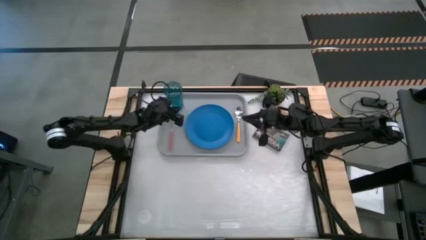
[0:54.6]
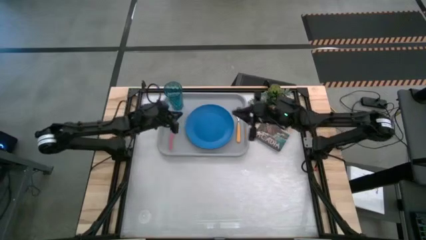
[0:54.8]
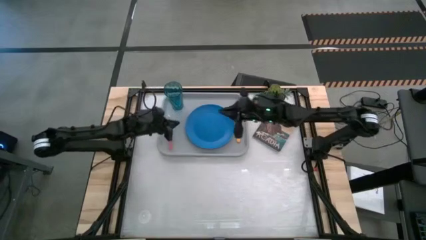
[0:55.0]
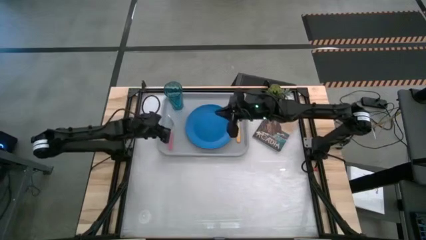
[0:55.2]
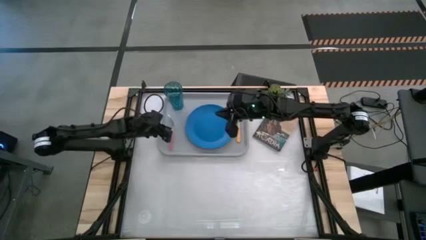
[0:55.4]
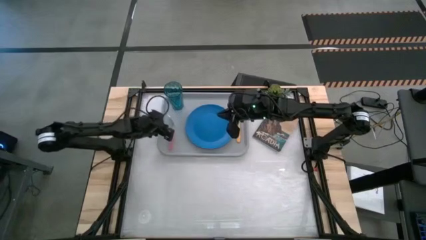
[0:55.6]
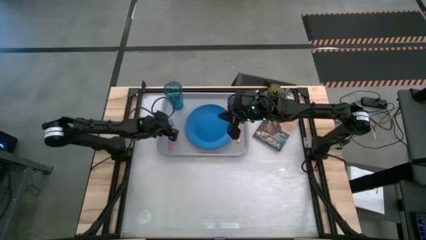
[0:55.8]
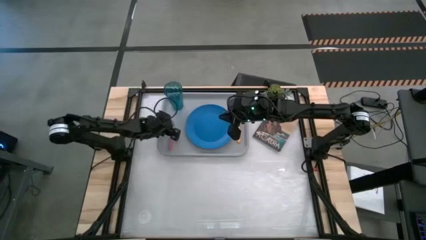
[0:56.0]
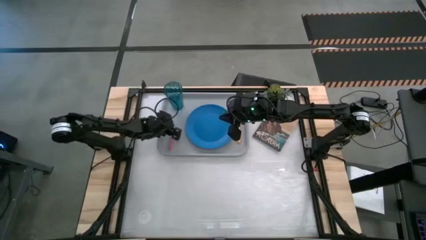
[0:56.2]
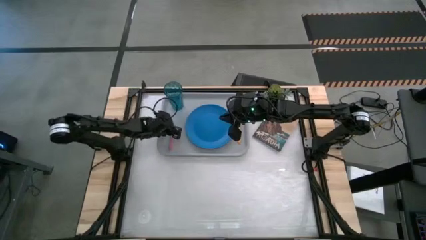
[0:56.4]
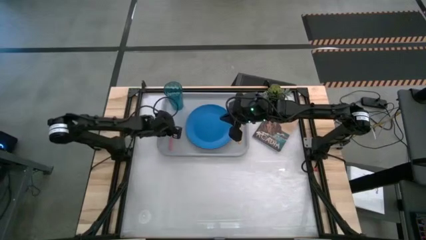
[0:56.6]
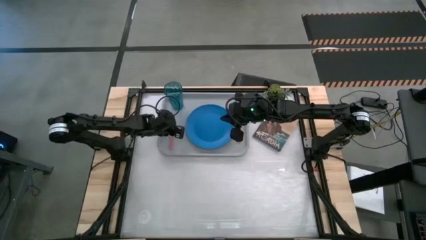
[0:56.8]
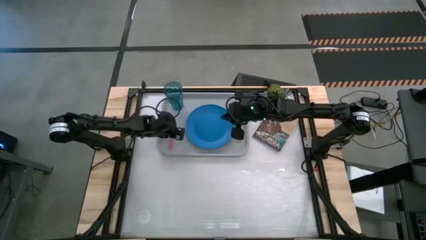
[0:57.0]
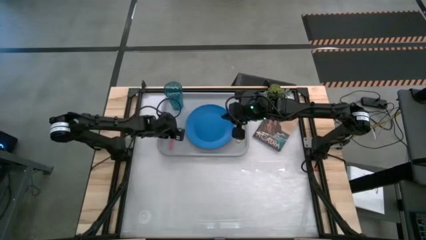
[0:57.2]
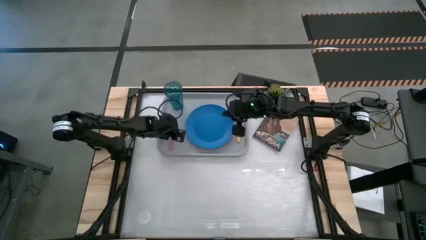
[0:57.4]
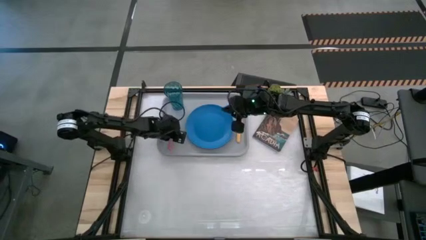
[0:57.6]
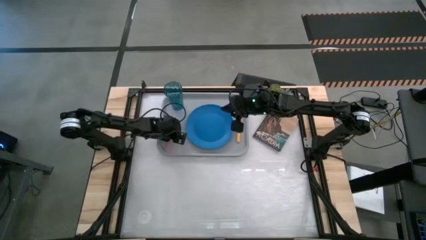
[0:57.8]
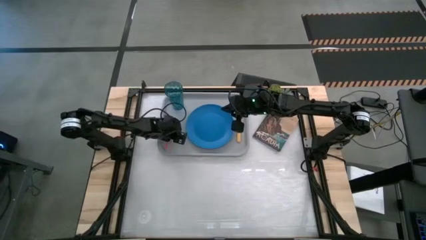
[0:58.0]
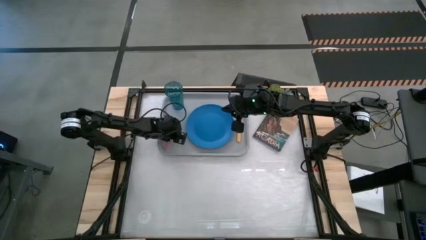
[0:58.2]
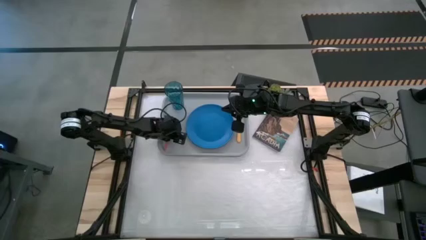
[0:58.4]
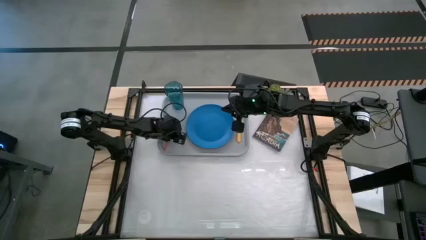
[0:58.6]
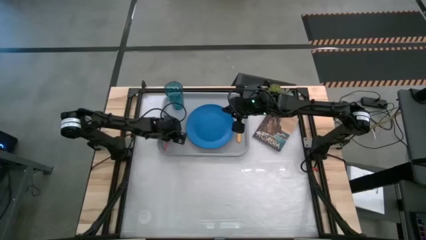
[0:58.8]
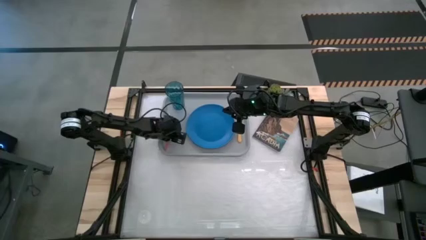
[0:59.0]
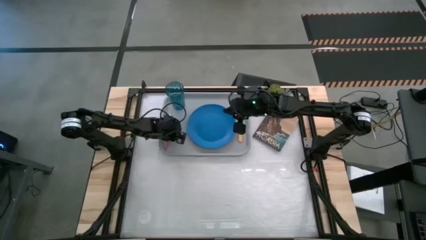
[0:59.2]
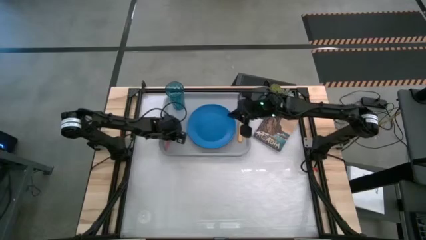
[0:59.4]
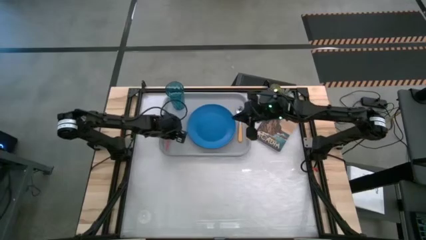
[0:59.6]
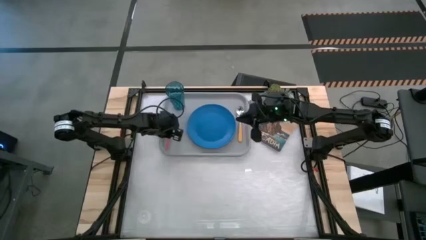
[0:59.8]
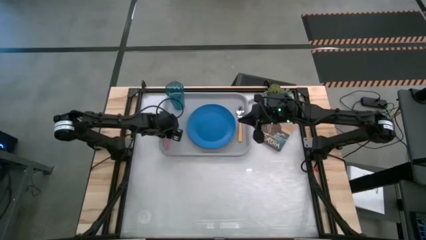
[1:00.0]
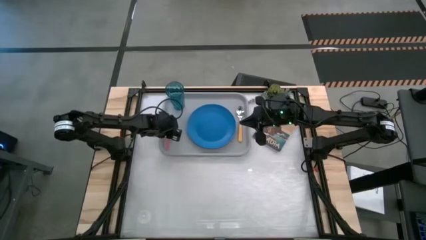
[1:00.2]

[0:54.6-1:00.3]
Task: Pick and place plate/cup/fork/spoon on tray
Adjust the pink fork on the gray tray

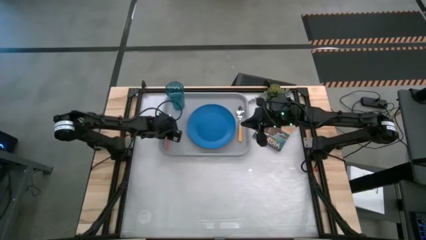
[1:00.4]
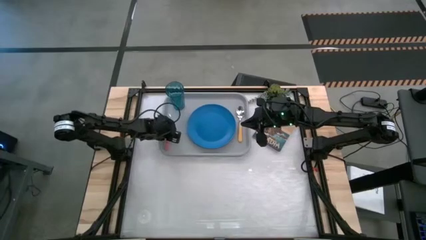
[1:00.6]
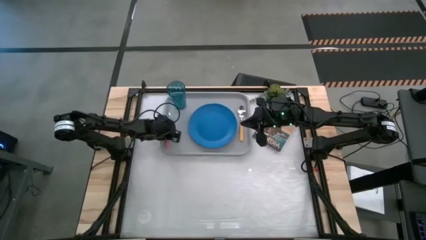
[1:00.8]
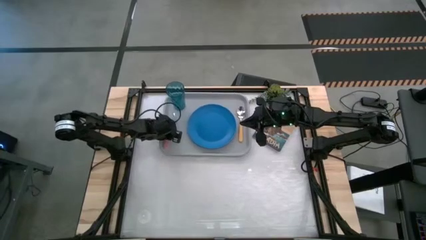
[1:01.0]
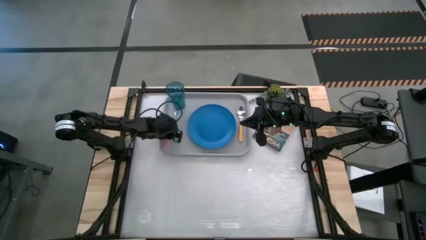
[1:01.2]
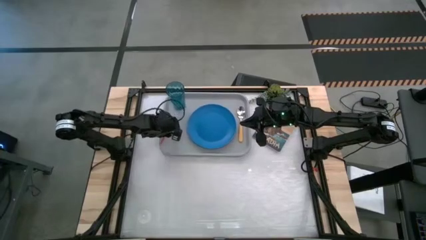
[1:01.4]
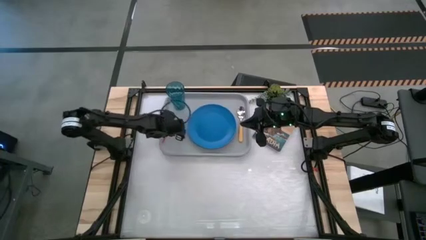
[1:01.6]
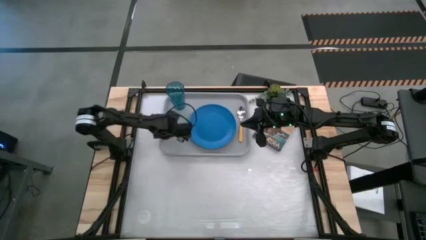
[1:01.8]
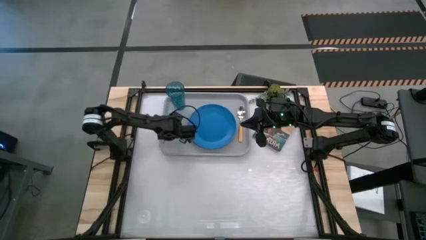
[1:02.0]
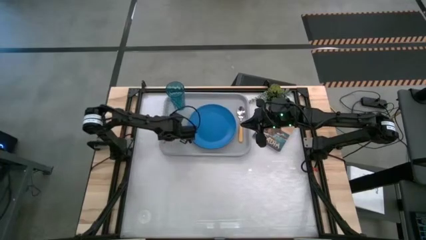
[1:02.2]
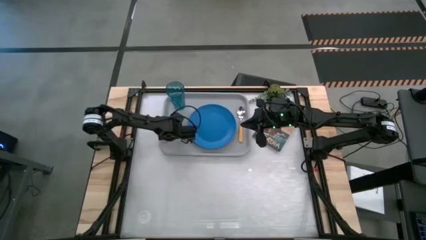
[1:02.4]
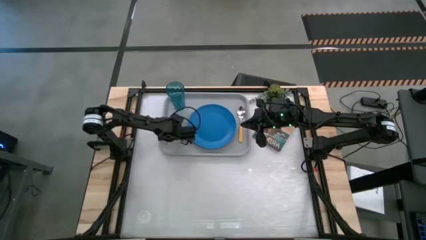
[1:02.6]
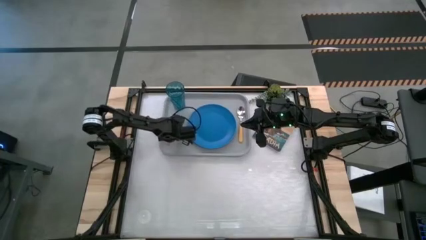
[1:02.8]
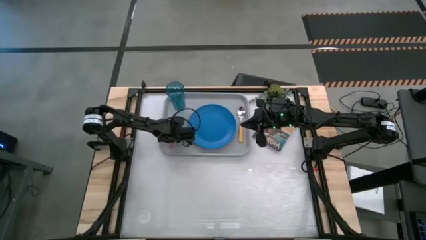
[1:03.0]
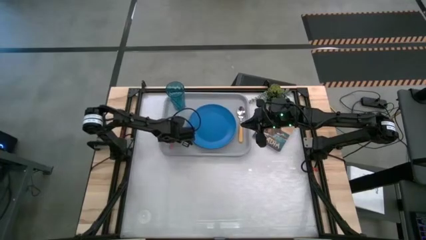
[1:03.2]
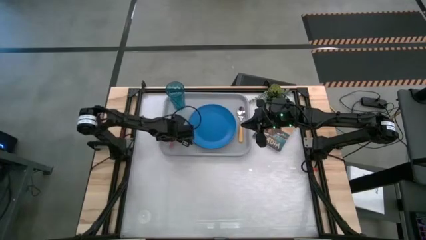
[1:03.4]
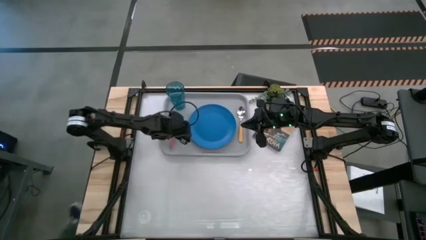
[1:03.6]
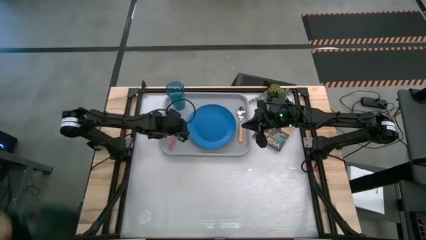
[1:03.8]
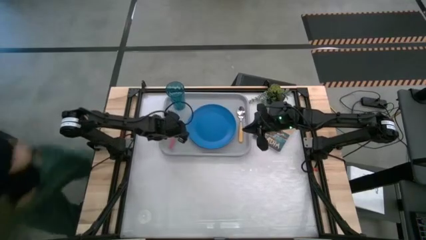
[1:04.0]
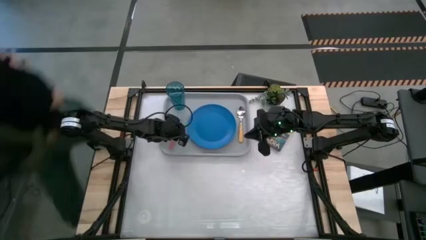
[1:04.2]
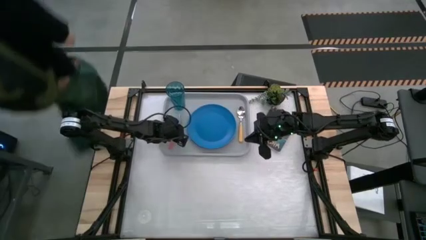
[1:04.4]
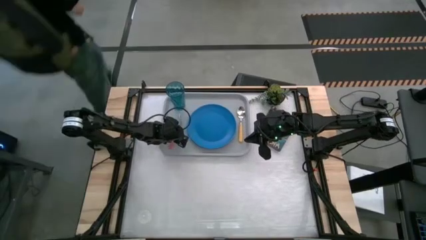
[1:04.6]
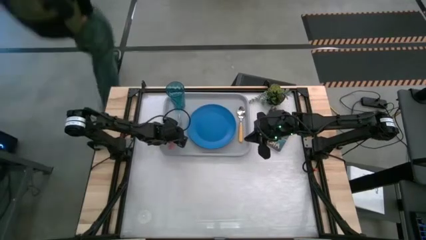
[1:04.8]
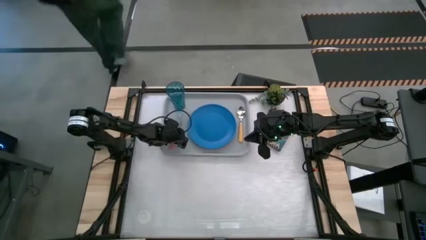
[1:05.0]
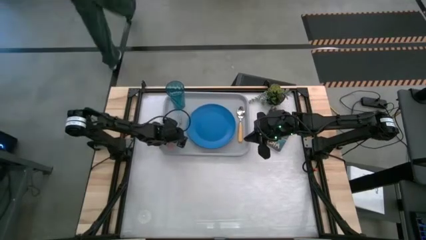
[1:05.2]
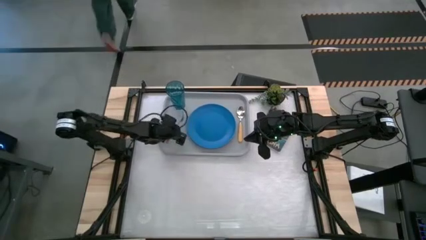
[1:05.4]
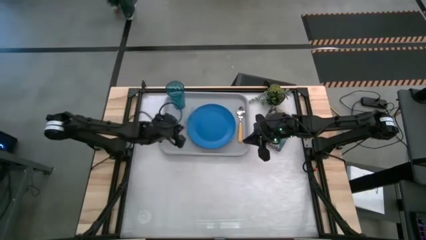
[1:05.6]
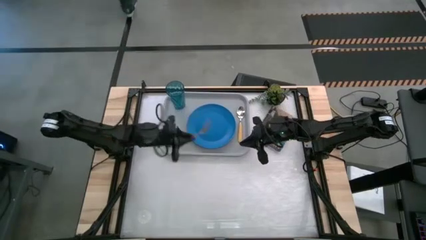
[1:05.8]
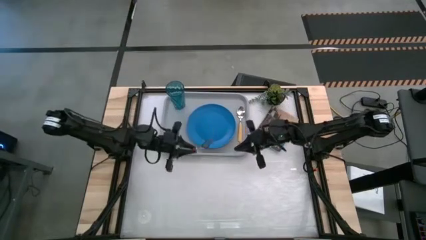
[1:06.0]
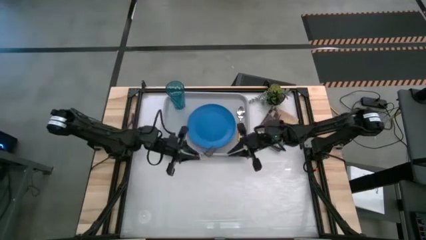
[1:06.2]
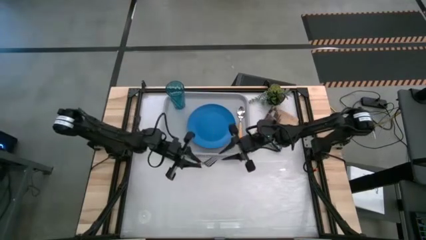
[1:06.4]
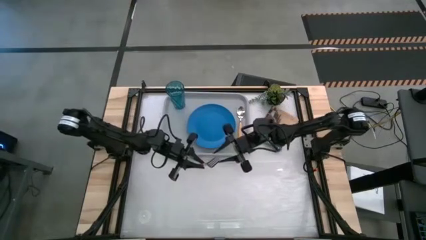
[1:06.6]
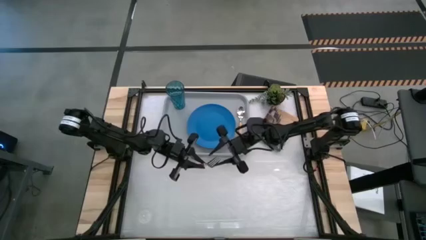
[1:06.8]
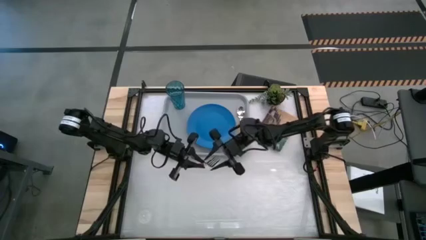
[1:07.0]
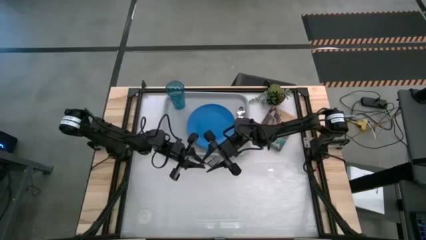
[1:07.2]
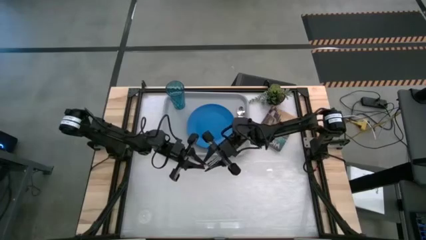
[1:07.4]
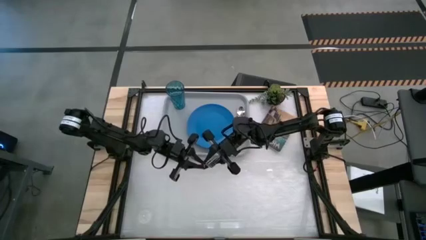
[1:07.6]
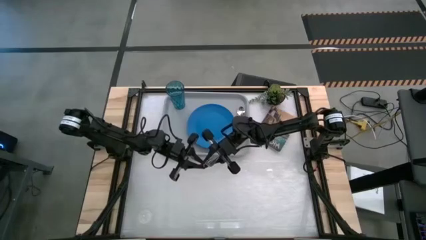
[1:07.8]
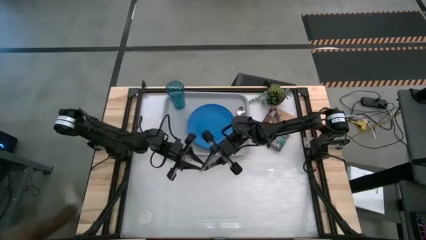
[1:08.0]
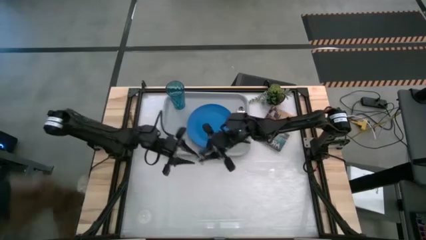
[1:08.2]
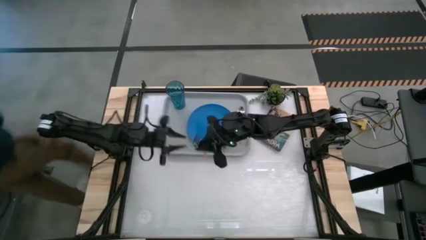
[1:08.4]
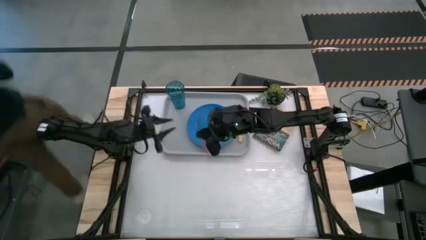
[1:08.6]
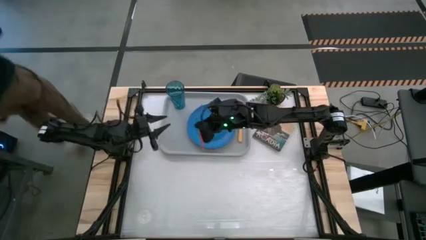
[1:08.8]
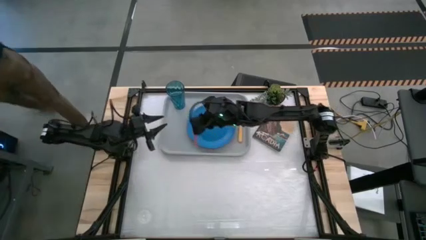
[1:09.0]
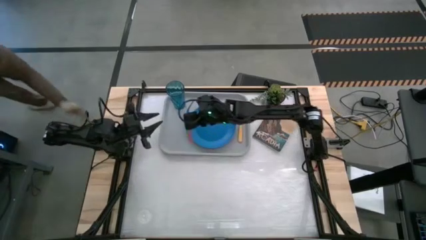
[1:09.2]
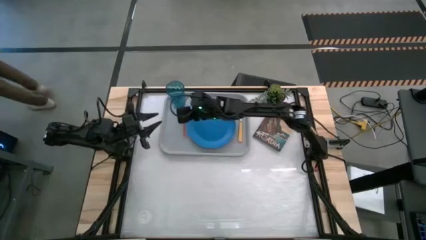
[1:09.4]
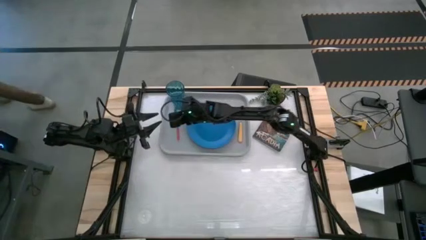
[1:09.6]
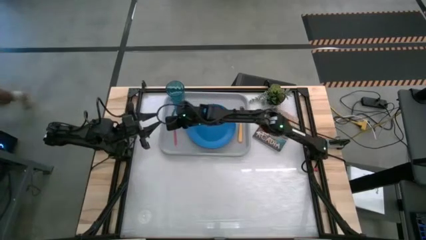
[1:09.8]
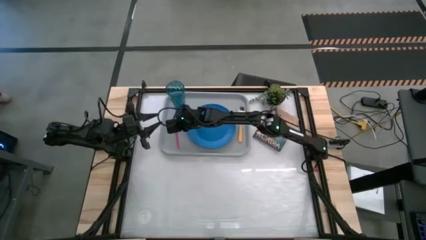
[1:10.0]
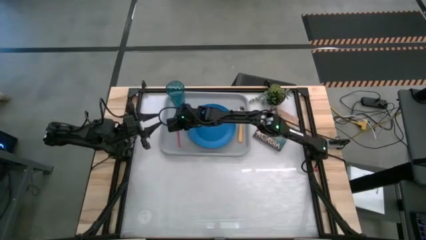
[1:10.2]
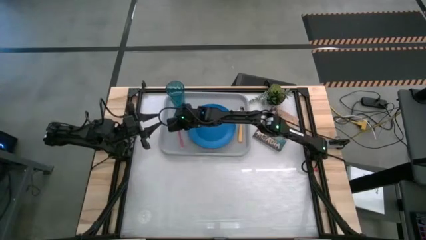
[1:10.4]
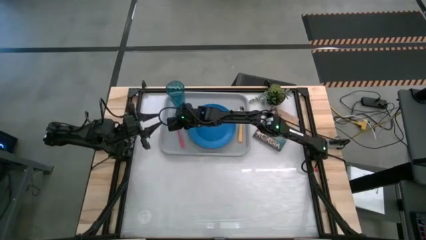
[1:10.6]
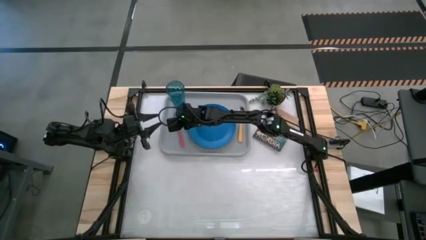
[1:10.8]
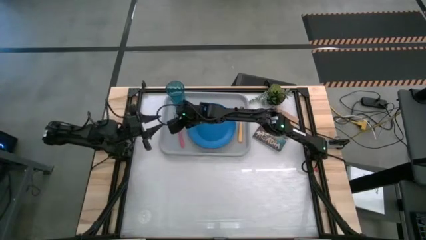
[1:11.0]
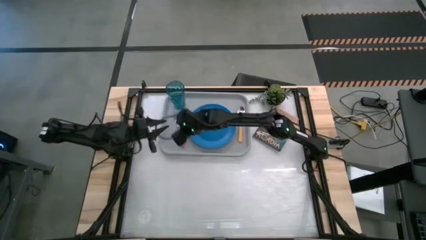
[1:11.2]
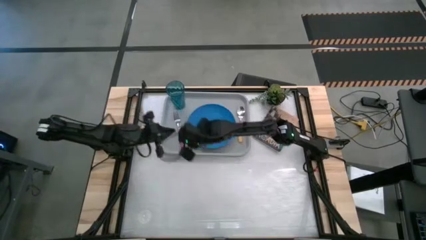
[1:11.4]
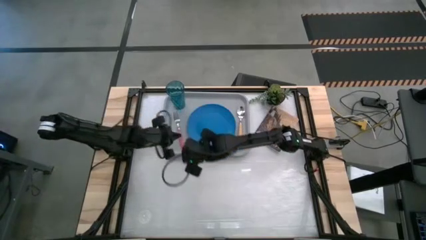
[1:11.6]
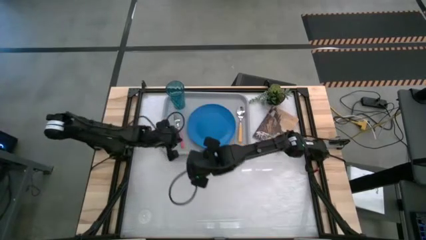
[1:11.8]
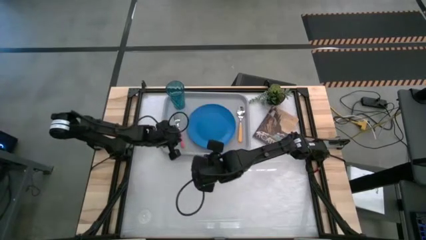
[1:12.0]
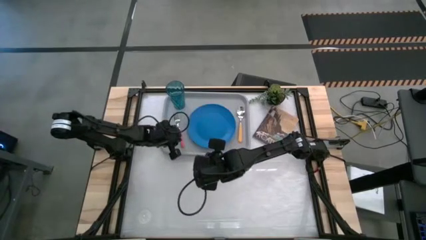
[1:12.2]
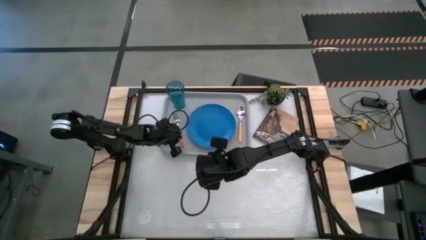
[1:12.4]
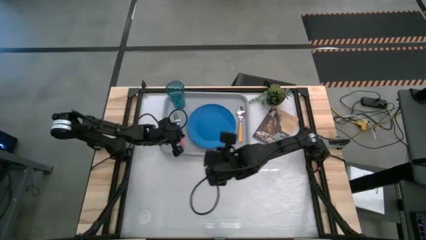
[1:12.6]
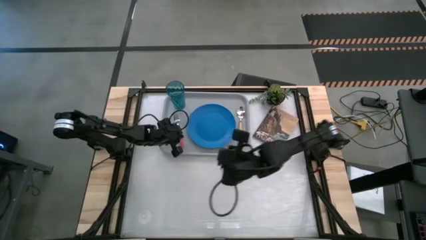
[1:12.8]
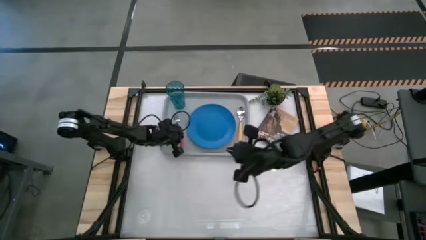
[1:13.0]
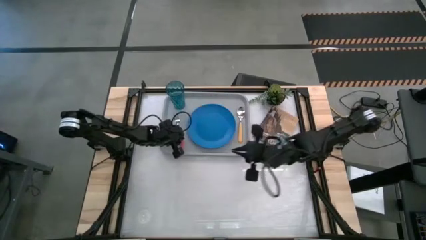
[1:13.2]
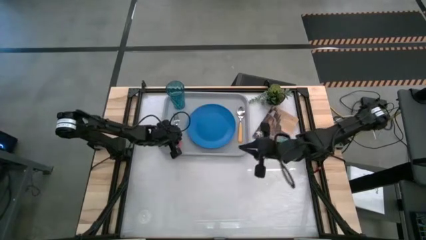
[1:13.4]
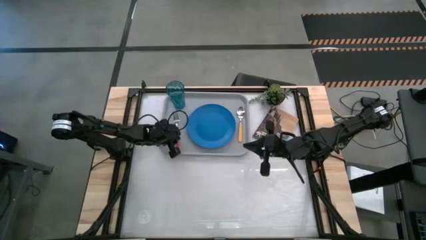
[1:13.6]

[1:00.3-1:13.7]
Adjust the pink fork on the gray tray
